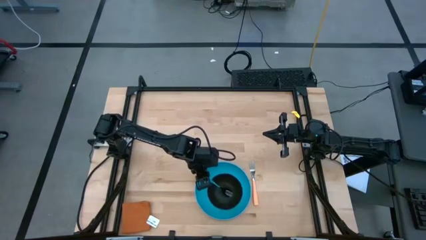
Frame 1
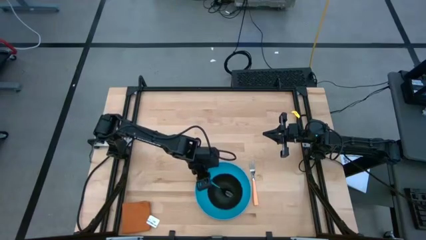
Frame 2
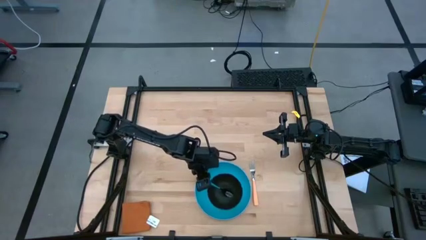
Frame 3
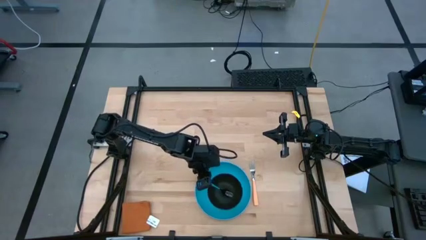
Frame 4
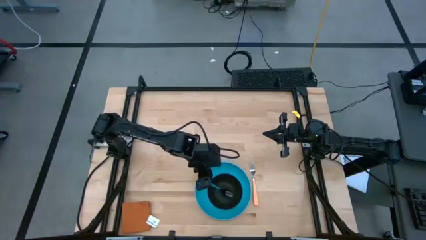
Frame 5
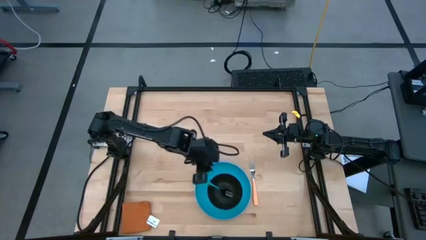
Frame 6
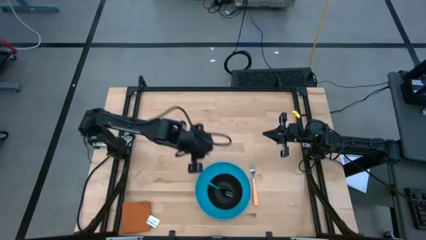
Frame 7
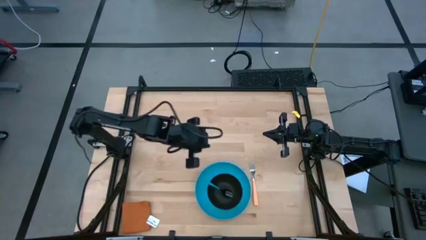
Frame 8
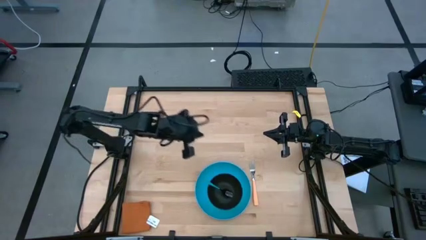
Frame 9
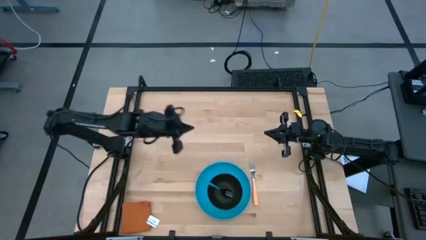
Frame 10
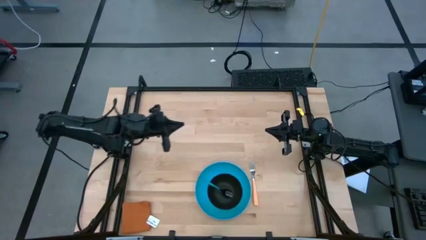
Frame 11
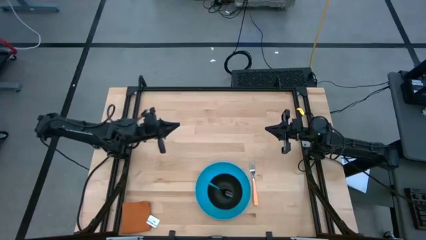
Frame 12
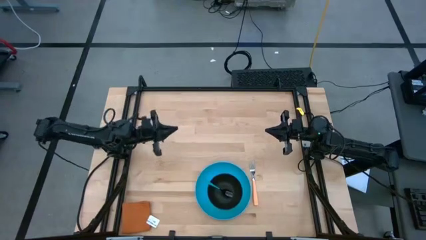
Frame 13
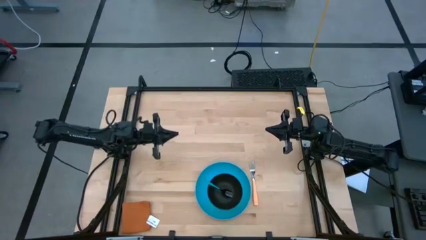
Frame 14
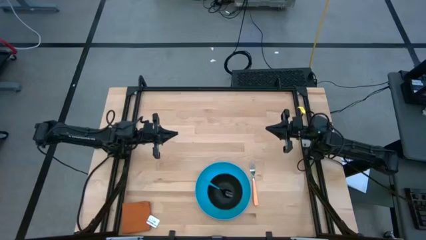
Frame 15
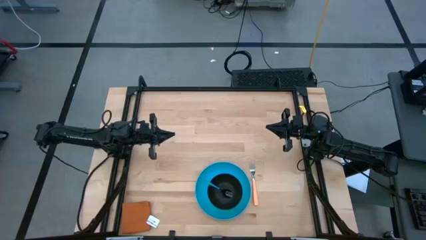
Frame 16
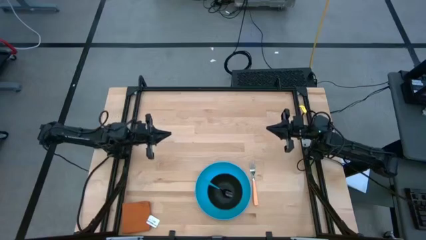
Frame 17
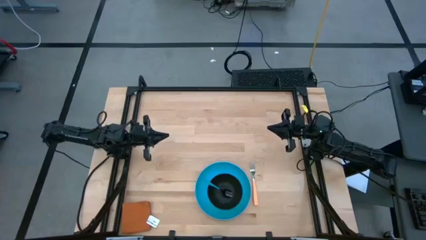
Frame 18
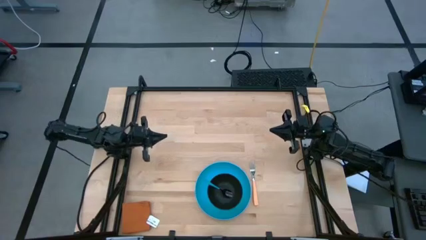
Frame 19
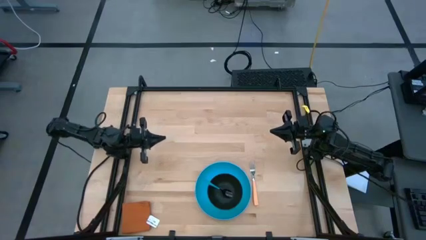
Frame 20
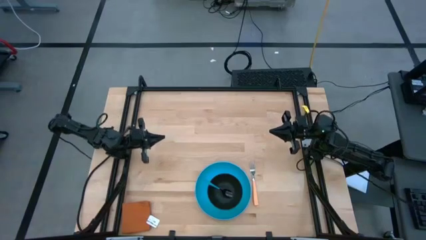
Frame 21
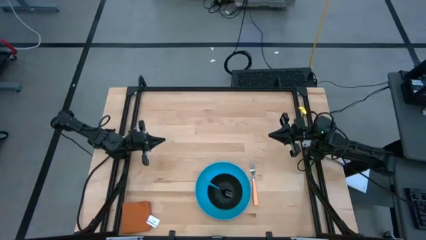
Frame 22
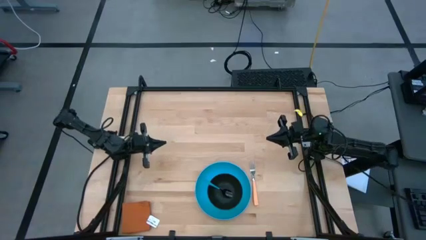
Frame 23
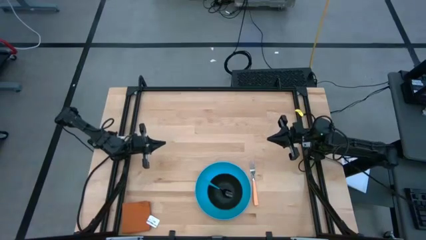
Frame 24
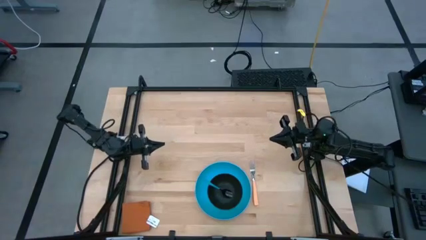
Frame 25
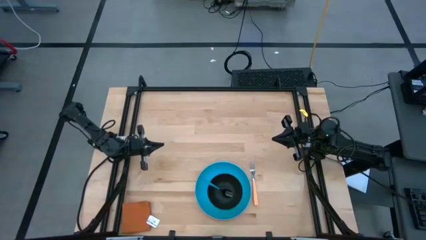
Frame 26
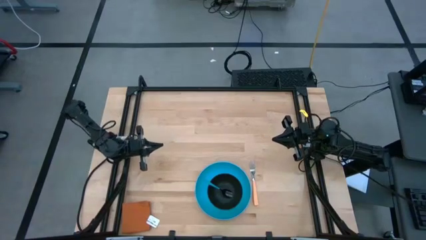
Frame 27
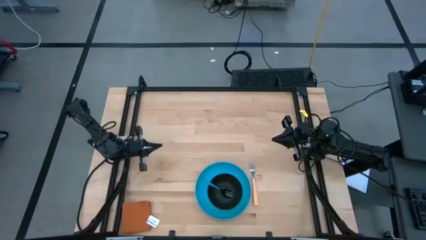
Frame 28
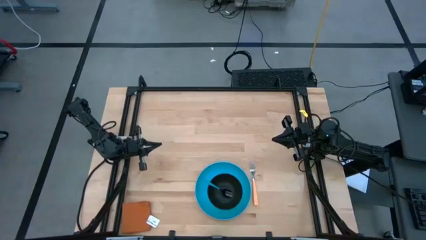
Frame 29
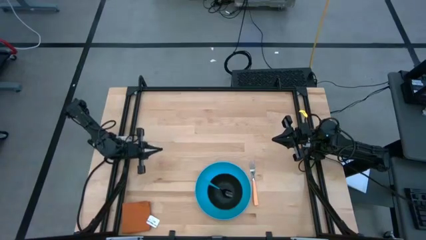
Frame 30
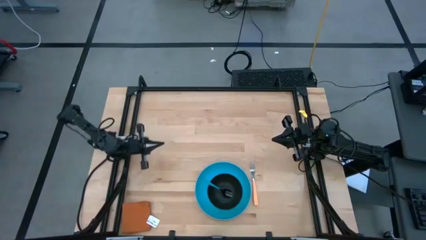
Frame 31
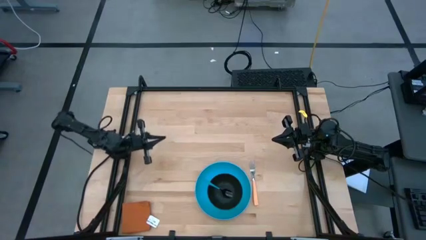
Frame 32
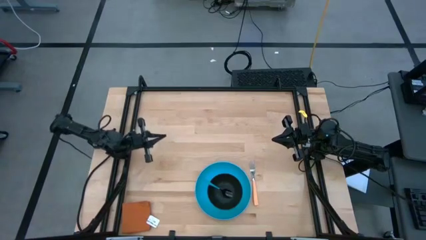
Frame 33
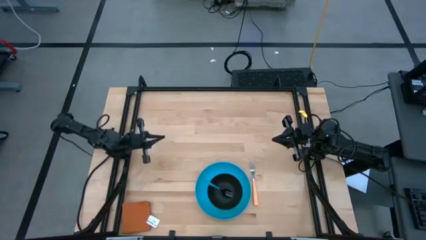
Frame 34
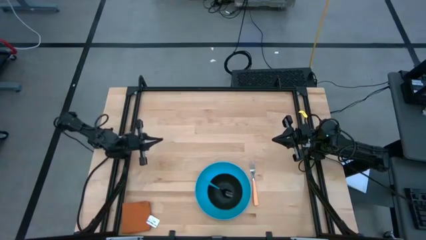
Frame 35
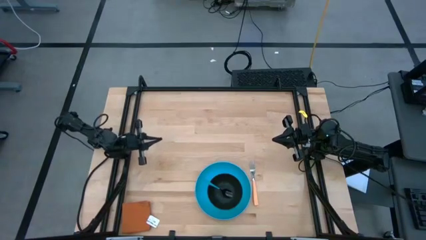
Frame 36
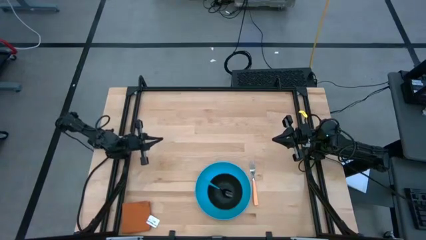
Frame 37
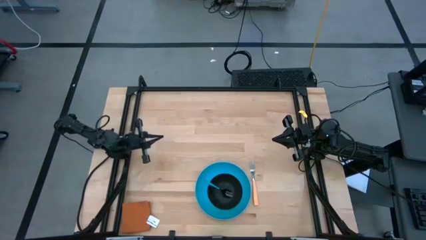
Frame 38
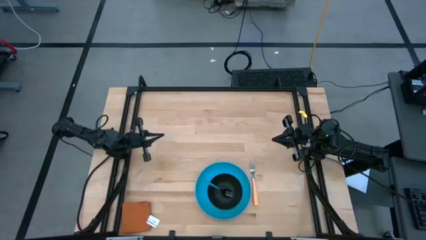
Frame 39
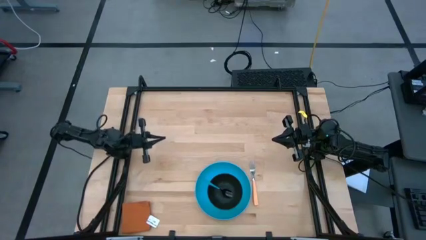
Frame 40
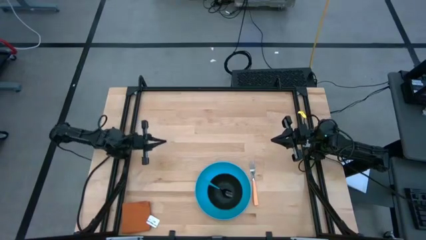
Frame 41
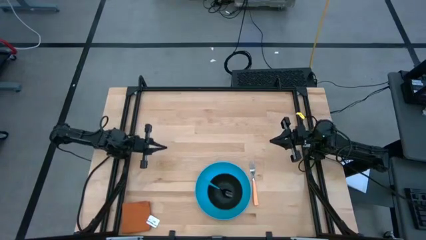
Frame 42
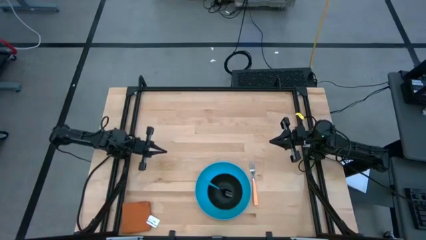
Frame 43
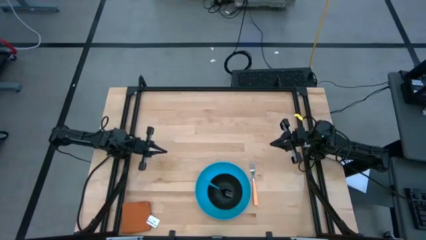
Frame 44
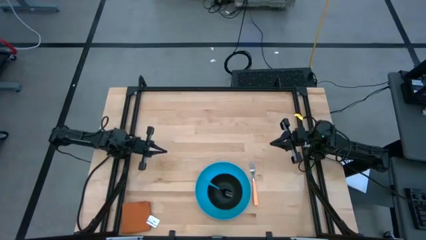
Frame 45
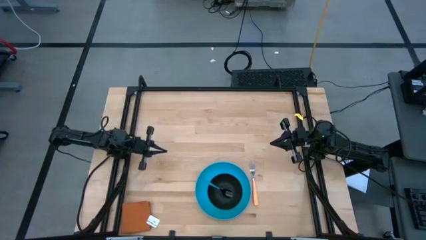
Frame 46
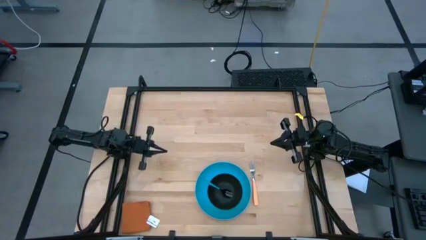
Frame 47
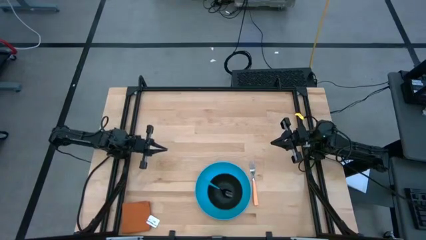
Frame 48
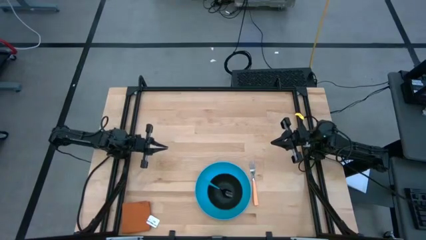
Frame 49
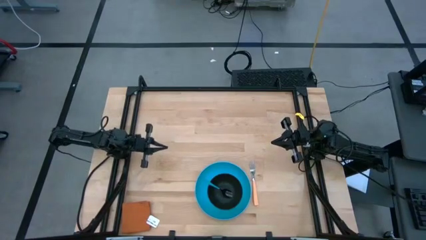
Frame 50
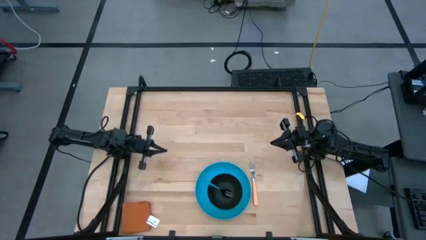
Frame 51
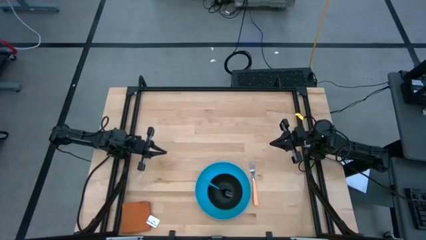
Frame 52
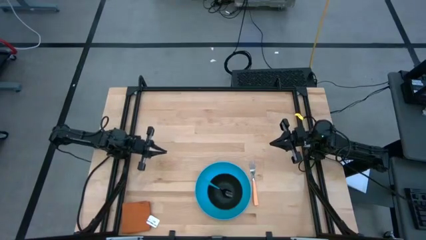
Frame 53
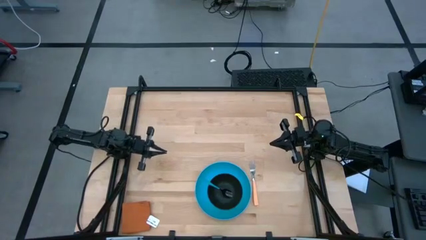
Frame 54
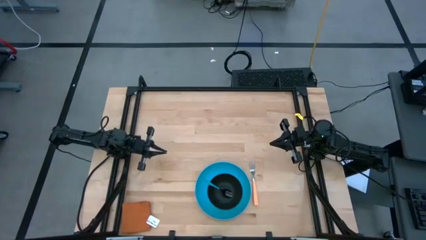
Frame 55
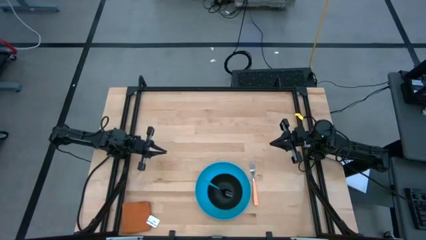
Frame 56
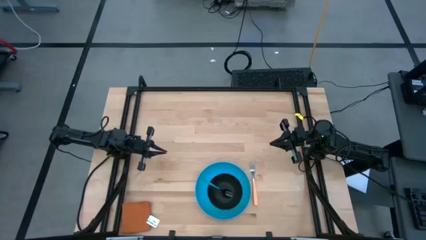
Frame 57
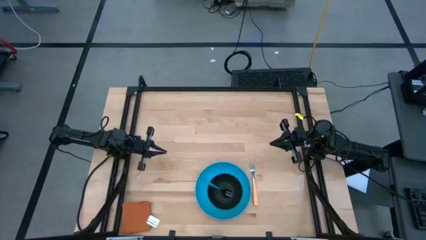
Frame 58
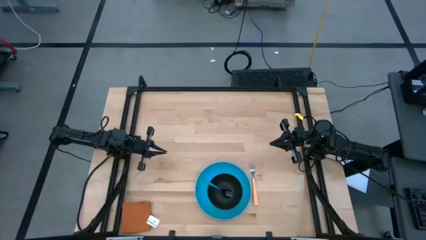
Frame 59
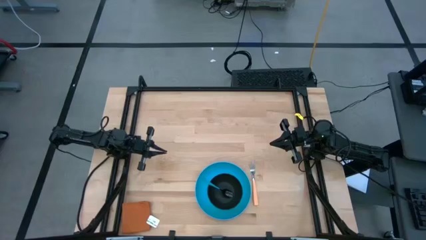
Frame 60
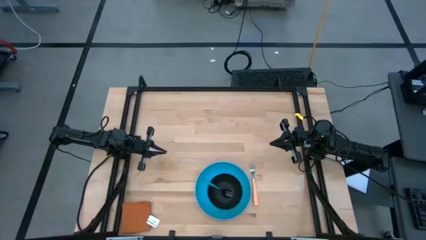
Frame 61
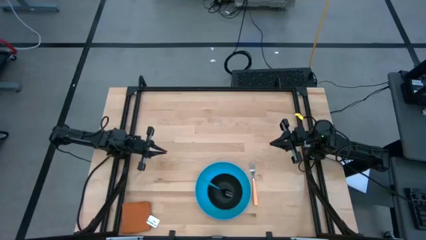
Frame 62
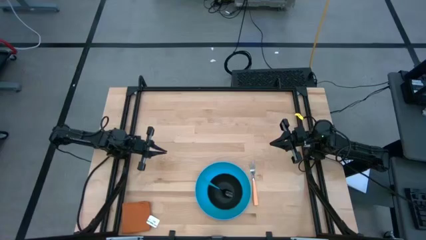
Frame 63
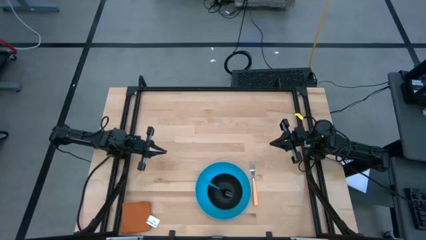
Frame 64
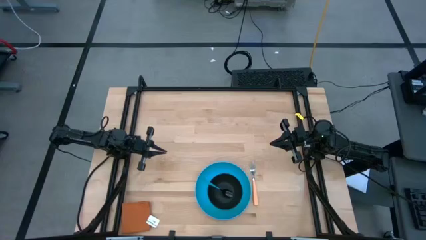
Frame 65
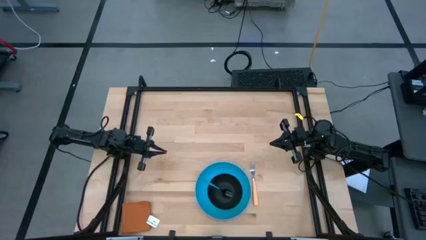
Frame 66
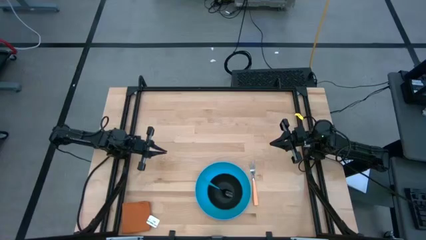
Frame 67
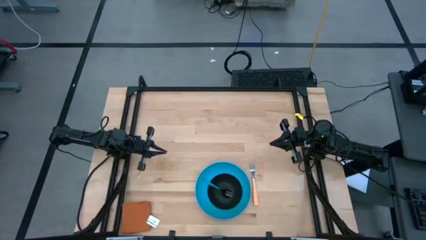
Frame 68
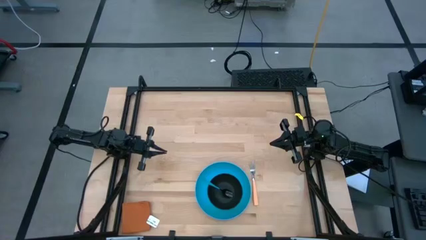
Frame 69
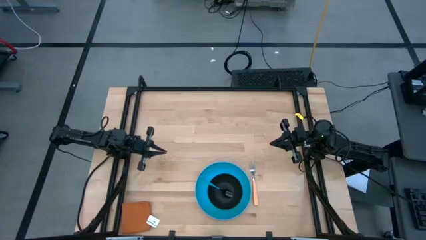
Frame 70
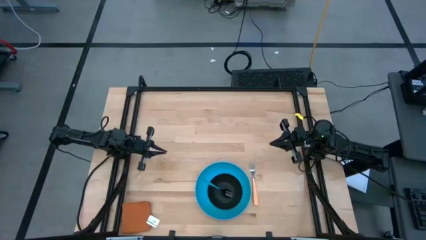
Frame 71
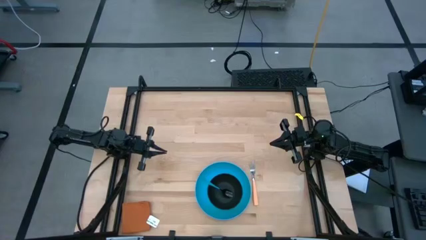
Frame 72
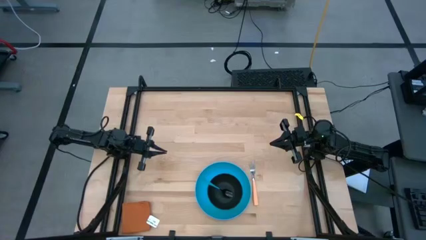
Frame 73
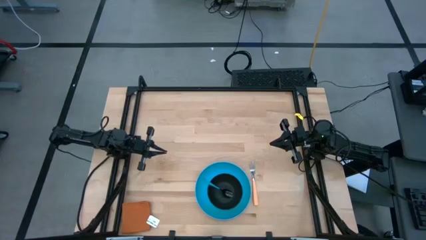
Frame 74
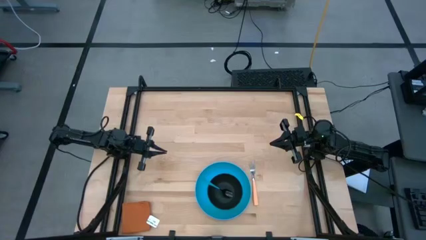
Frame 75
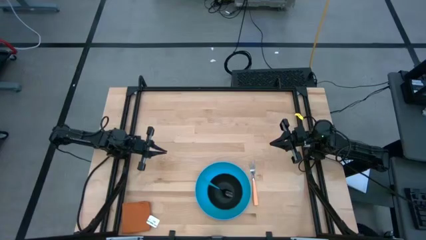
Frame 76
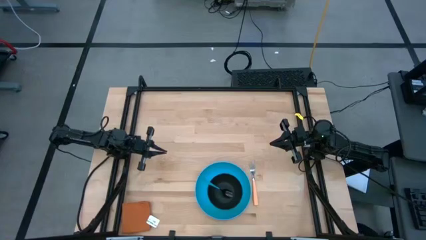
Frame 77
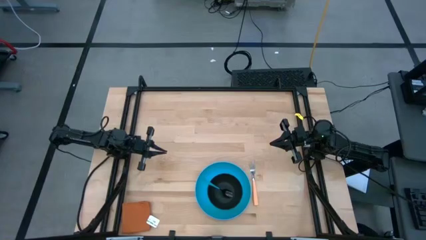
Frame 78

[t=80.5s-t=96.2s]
Task: Set table place
Return to home position
